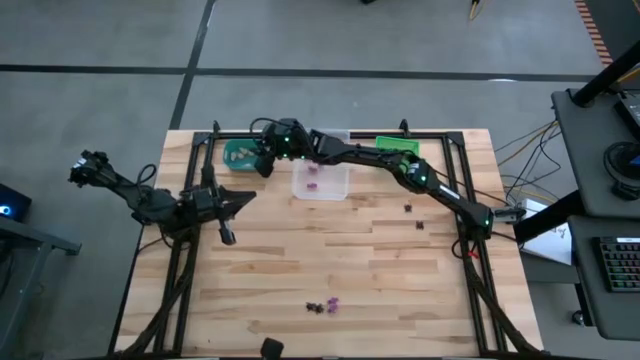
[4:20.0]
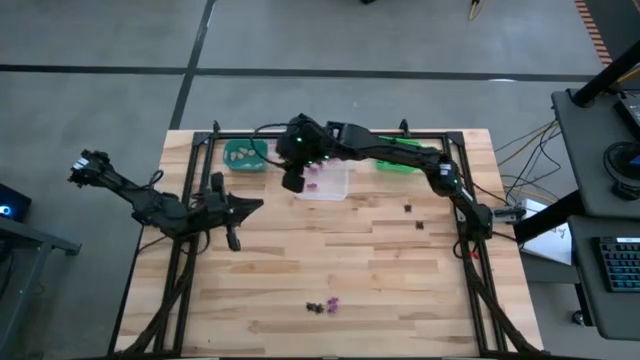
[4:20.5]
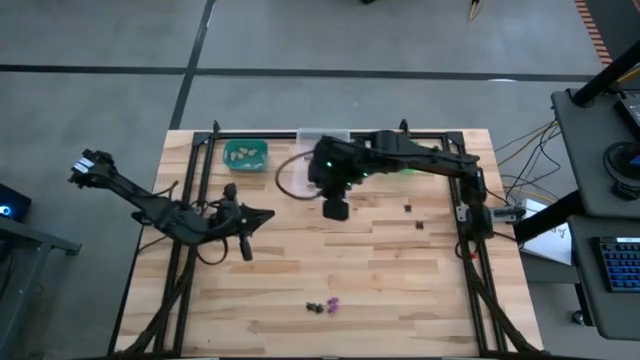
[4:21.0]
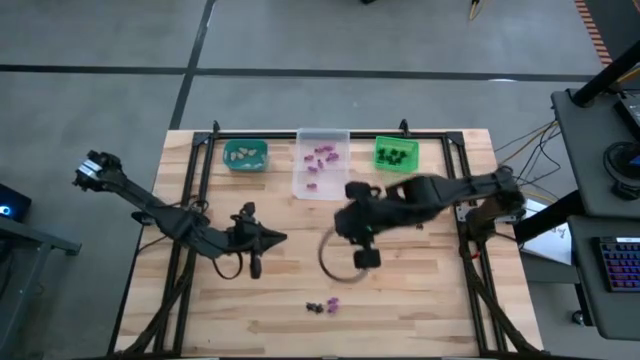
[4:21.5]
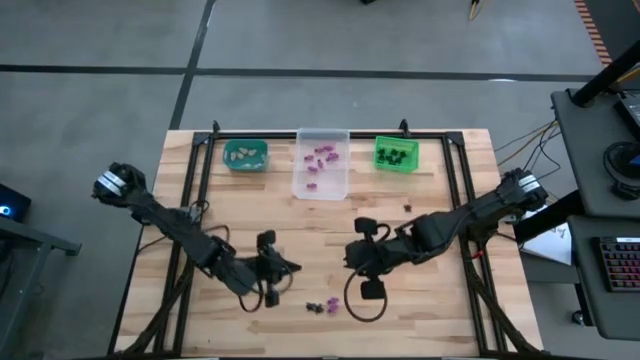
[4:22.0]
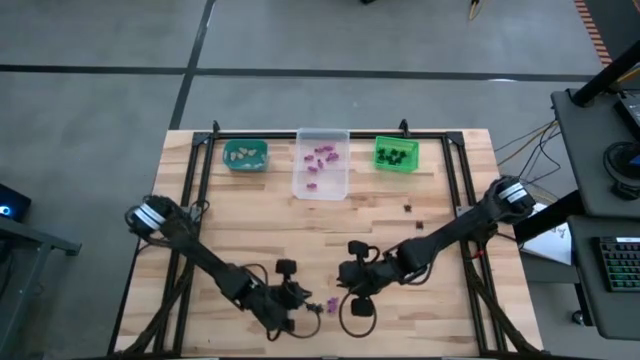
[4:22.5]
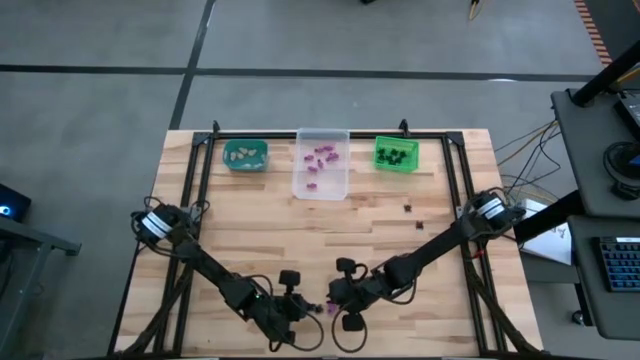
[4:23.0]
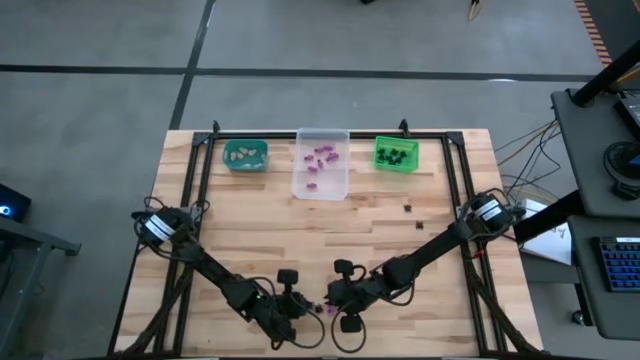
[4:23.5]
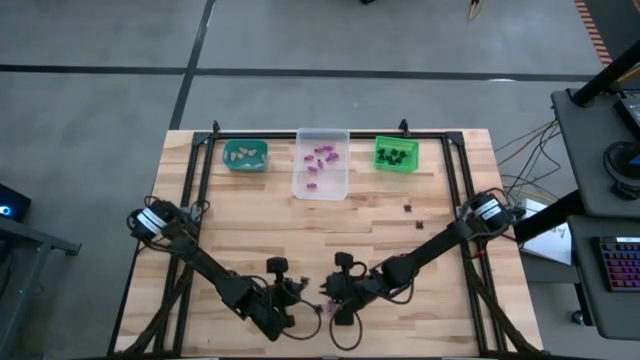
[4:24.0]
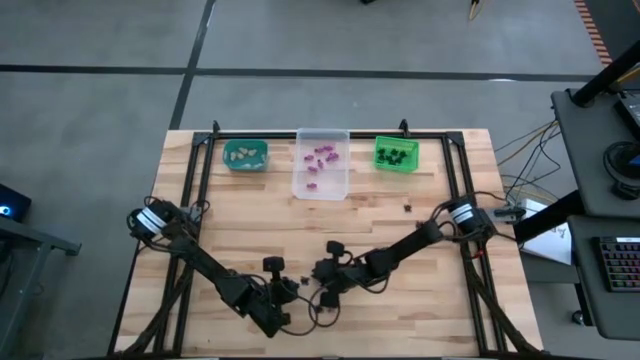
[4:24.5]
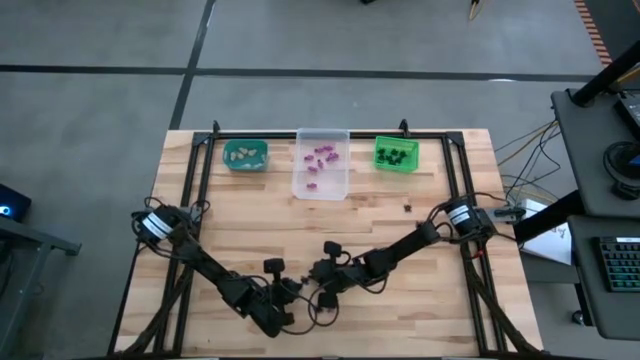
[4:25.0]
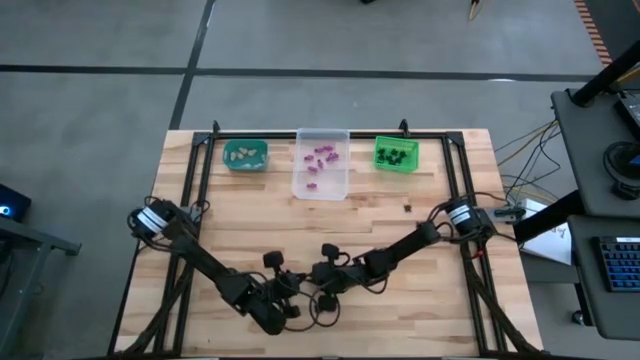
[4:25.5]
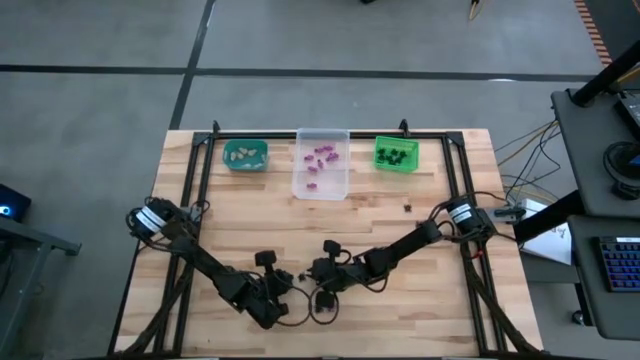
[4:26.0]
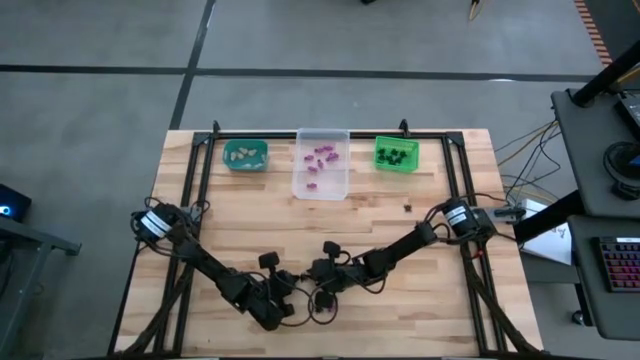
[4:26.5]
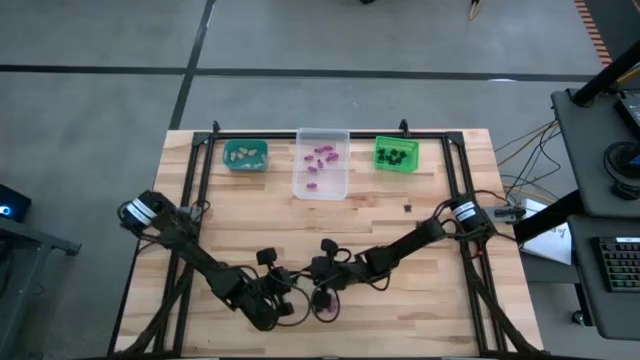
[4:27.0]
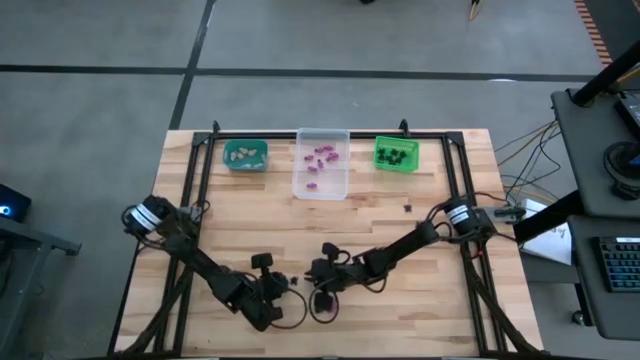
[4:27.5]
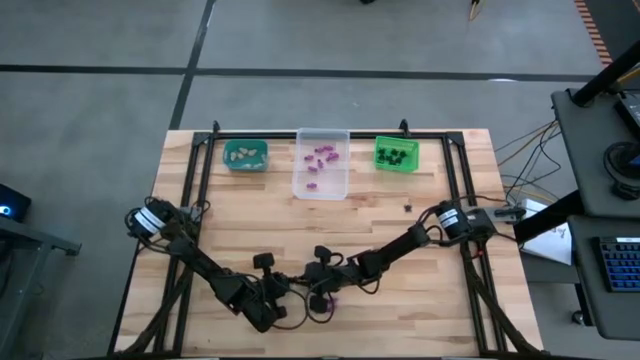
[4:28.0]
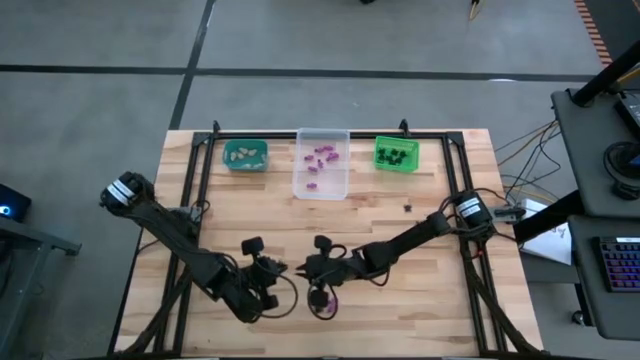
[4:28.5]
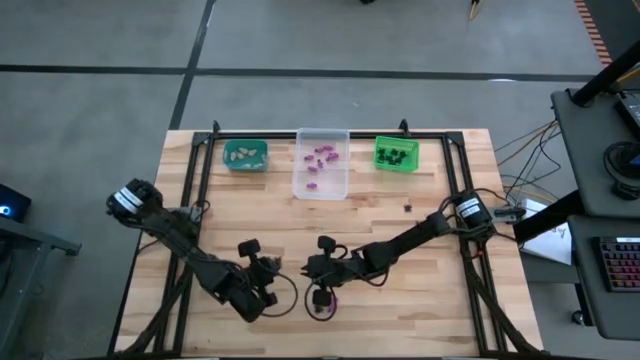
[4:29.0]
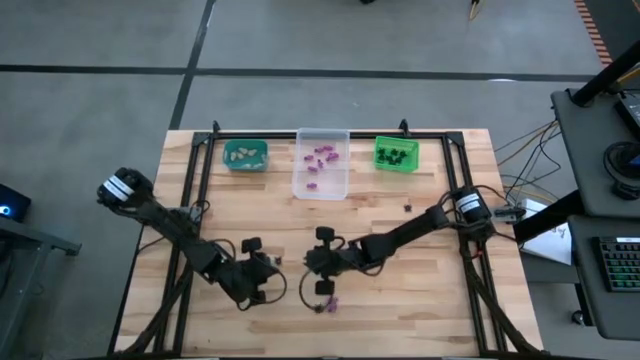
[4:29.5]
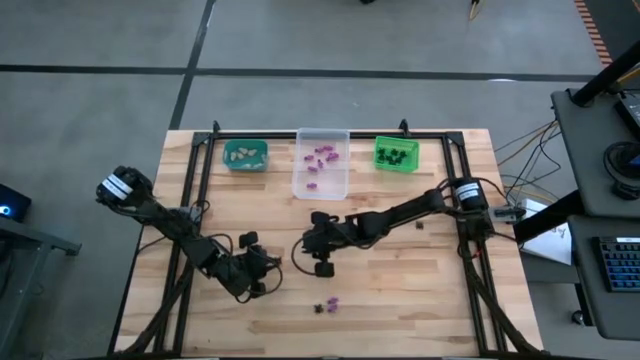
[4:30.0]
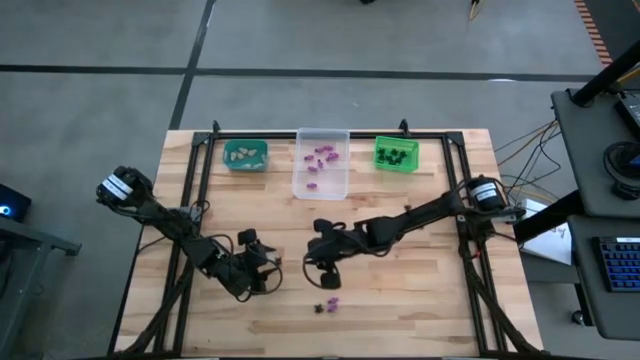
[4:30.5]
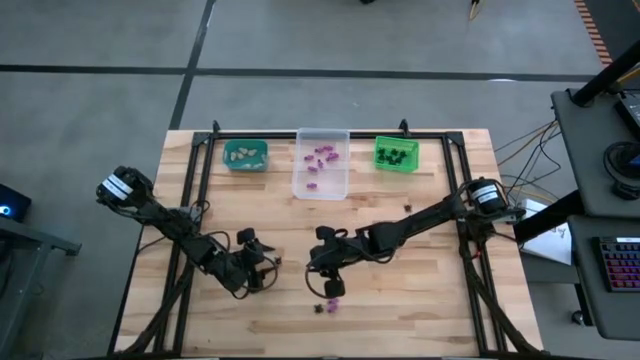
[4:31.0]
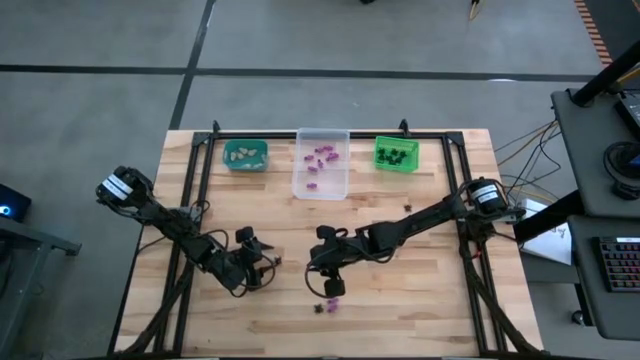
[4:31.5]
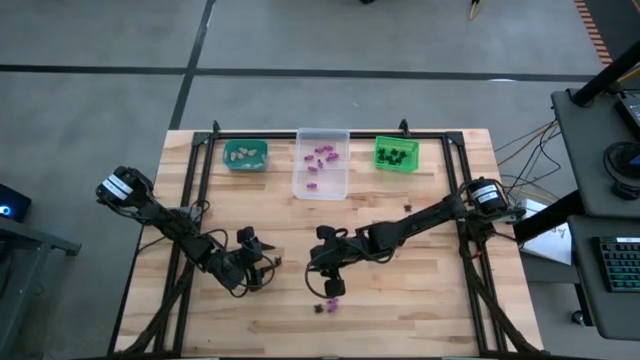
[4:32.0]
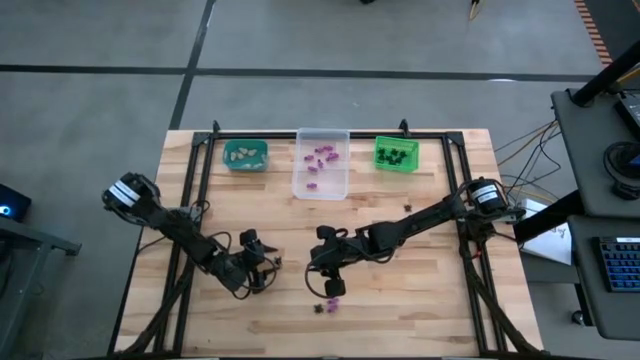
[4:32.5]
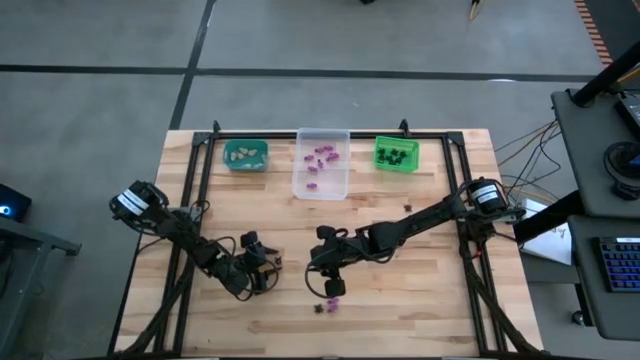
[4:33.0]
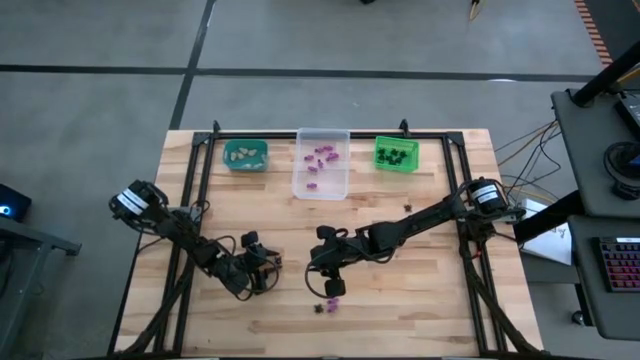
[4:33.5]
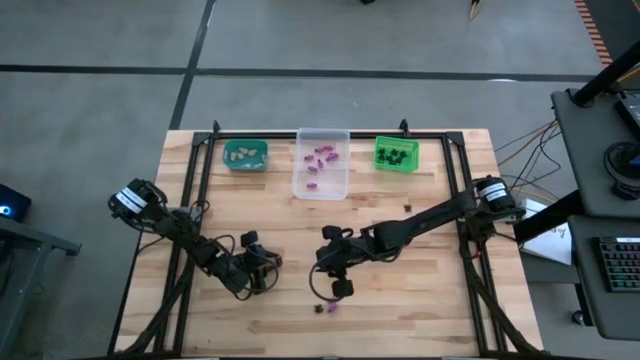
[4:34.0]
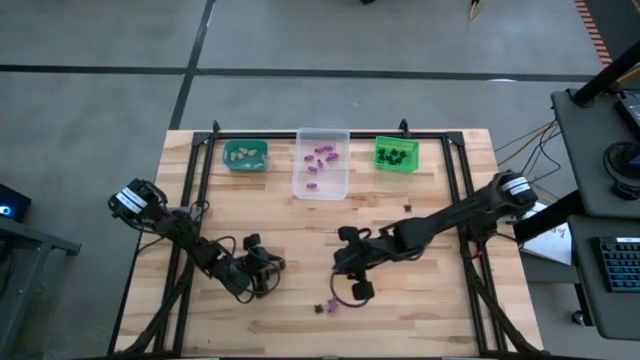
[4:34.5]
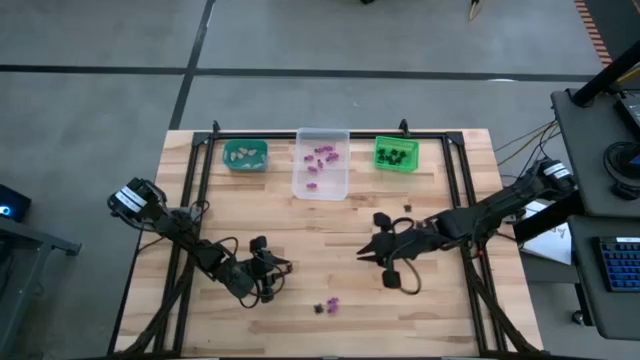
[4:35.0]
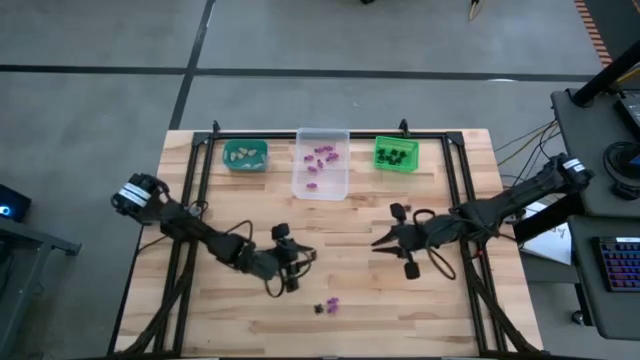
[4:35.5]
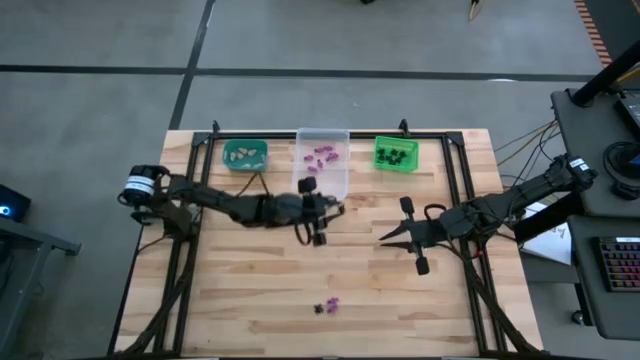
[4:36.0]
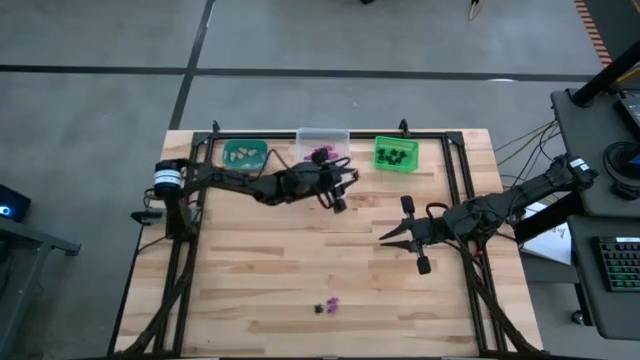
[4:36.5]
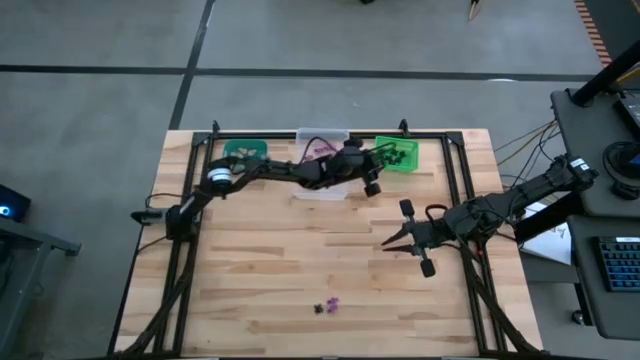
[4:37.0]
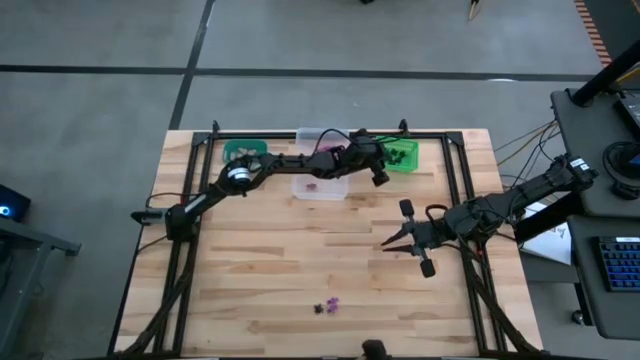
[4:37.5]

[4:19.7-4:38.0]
Task: Sort Halloween decoration
Put the black spider toy into the green bin

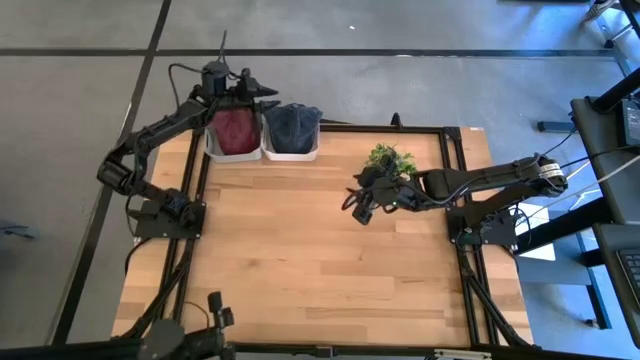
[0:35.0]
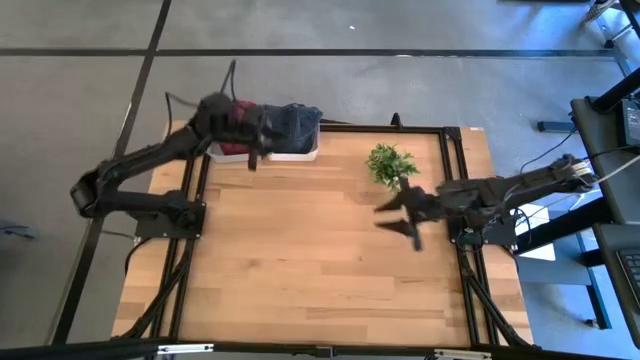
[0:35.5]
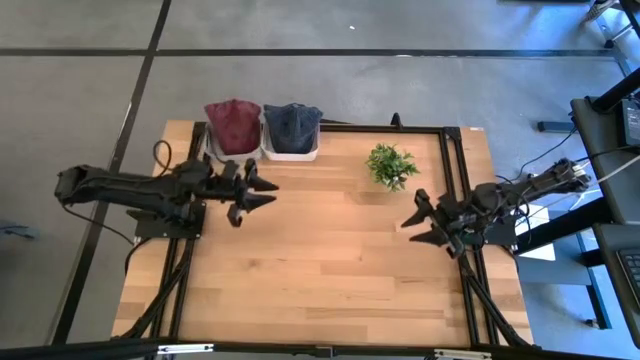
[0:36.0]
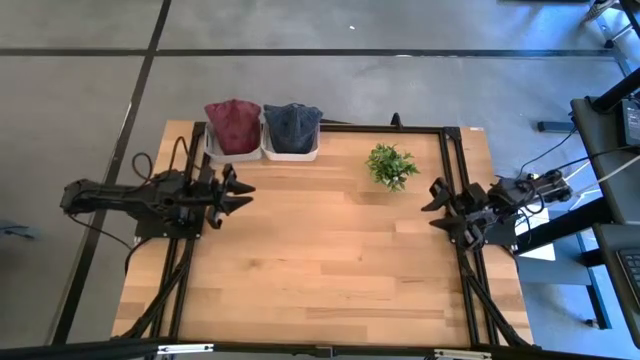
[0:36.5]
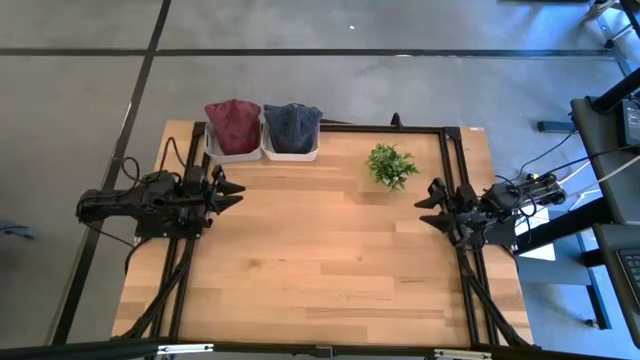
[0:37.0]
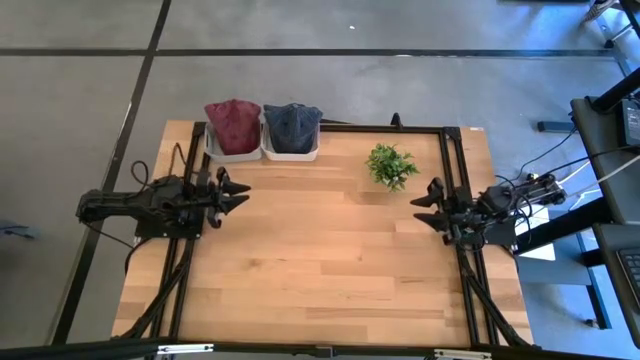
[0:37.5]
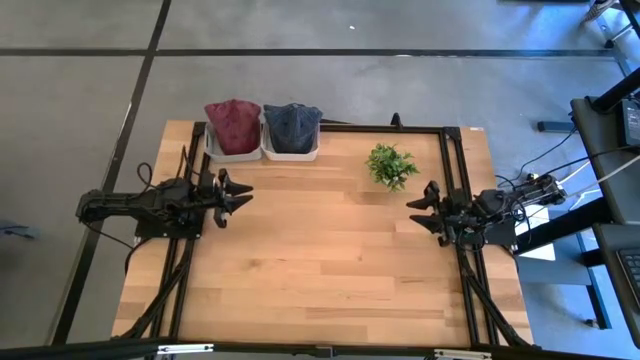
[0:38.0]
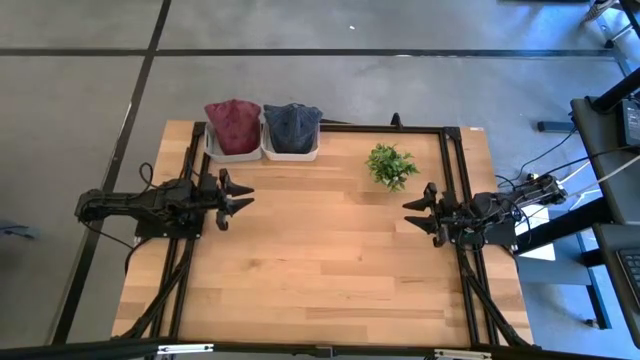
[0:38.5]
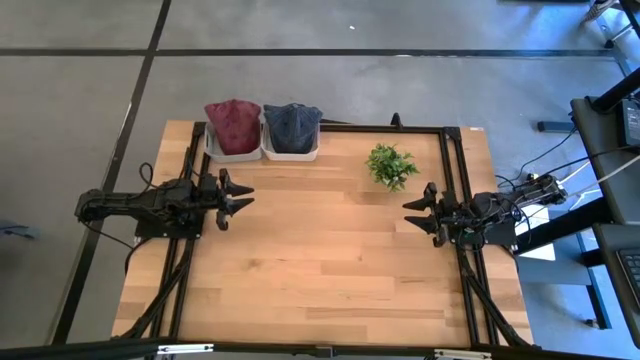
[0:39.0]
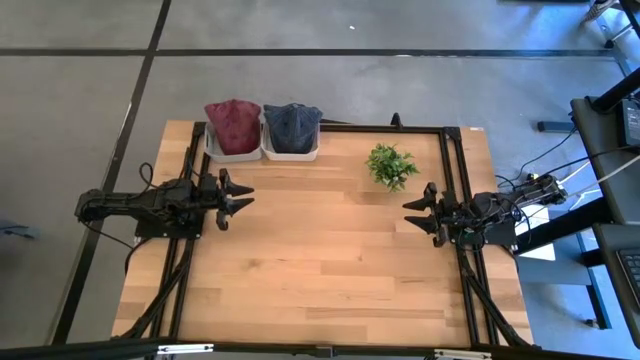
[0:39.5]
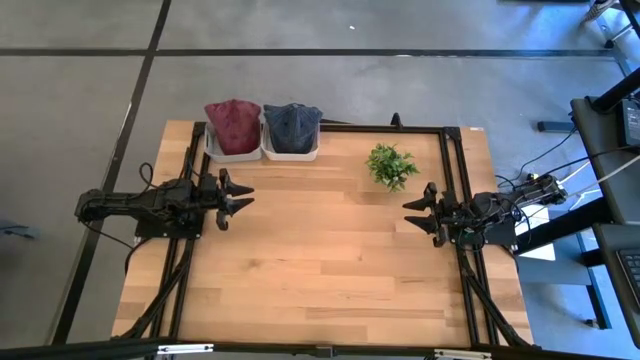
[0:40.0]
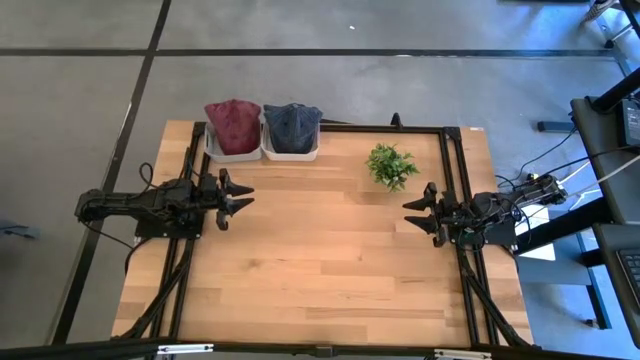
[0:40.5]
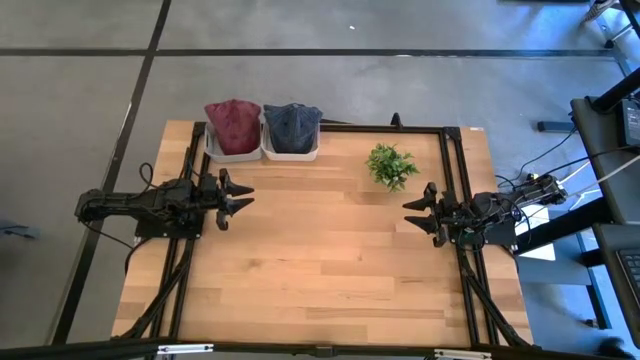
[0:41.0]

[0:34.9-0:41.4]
Task: Pick & Place hat
Return to Home Position
